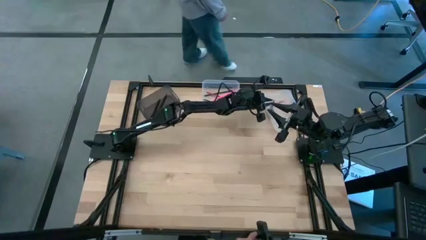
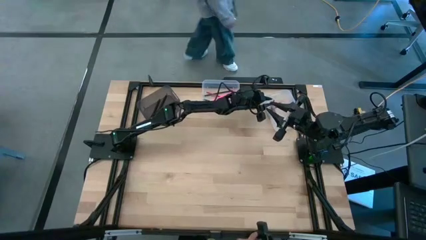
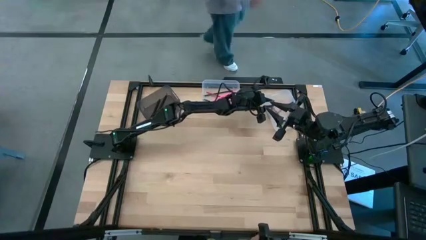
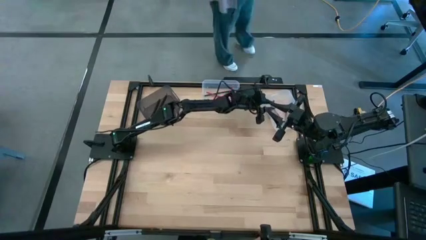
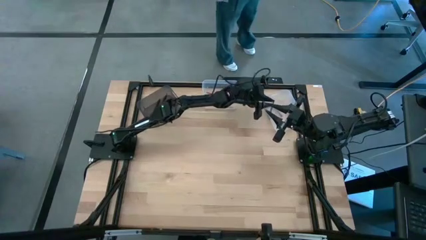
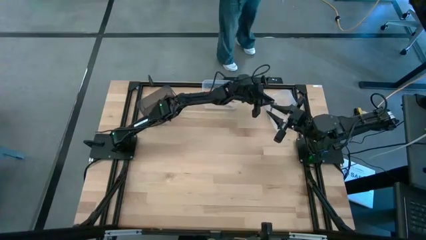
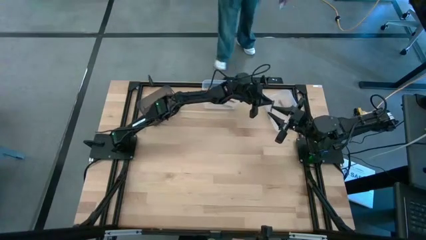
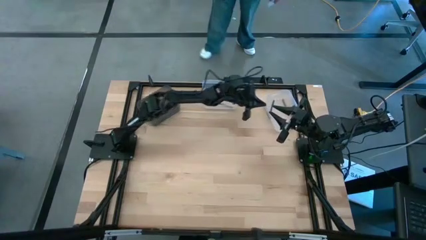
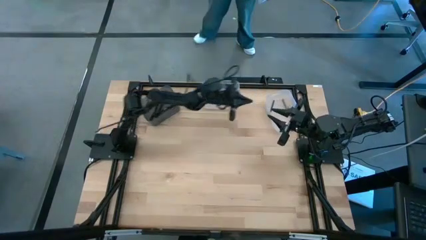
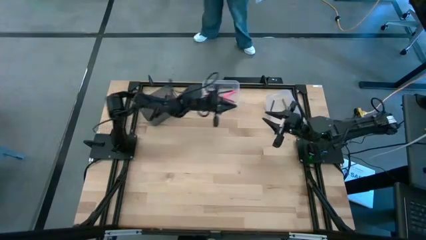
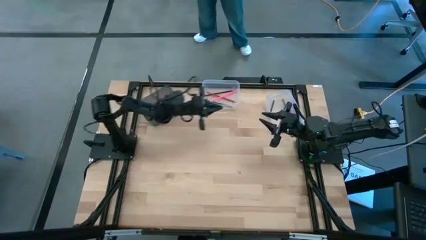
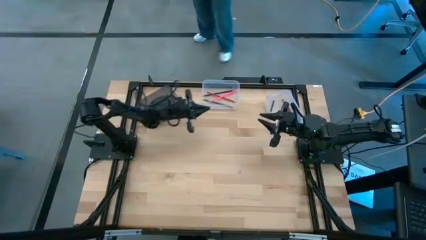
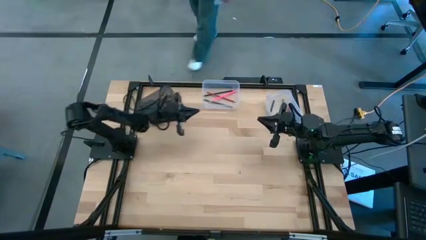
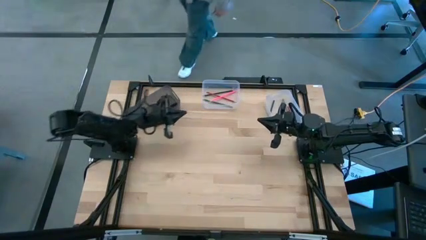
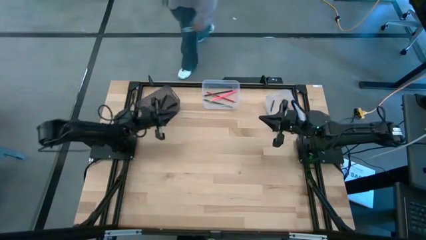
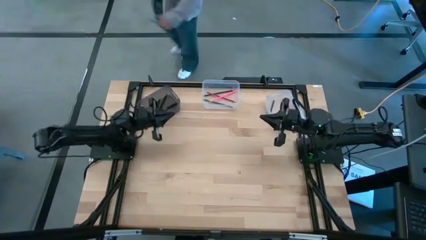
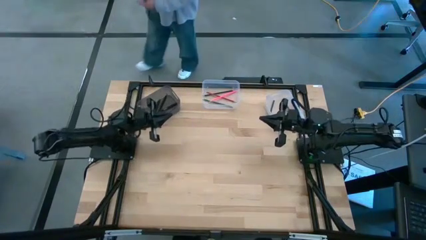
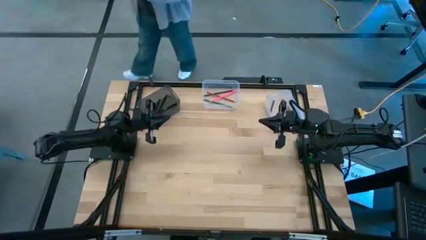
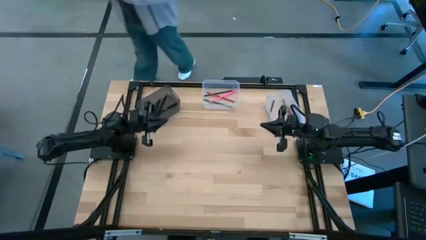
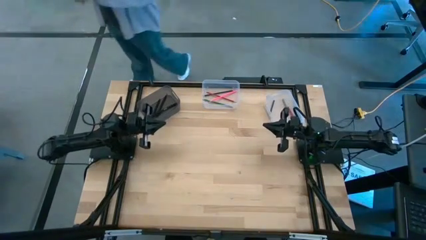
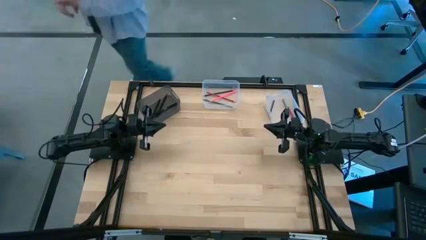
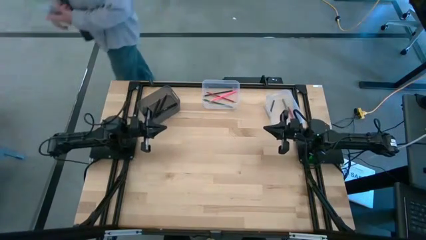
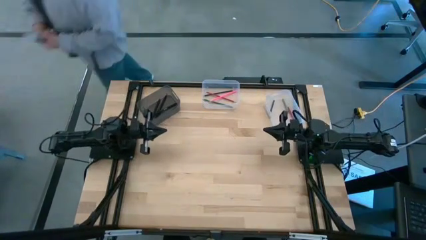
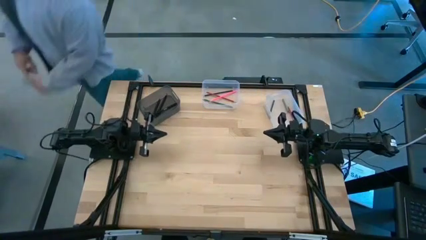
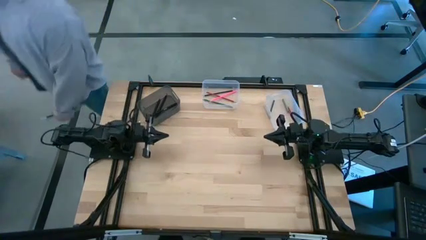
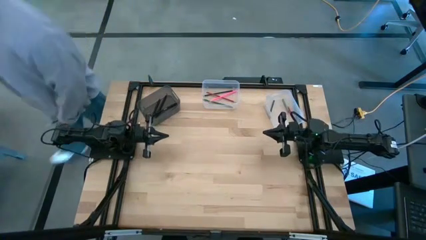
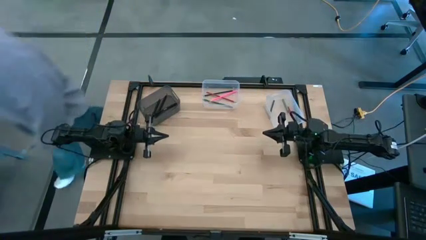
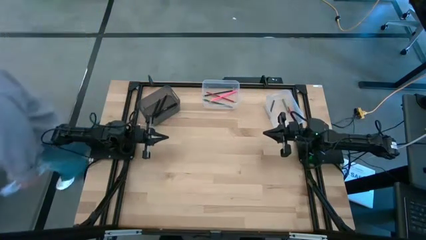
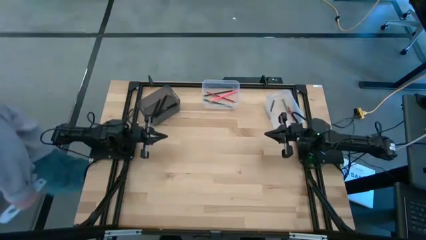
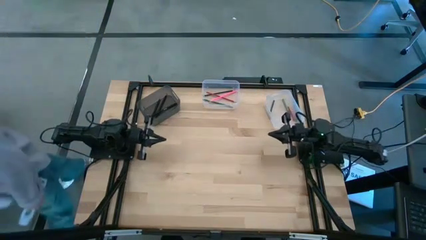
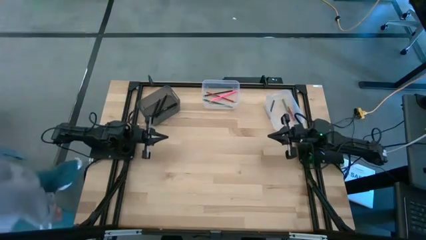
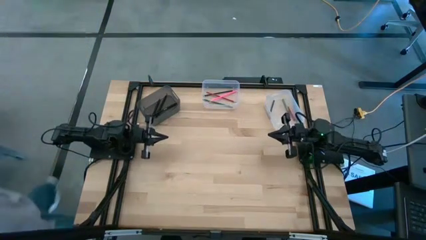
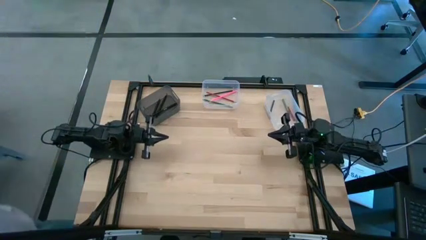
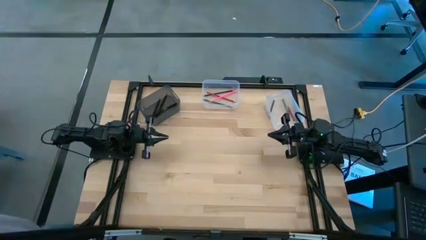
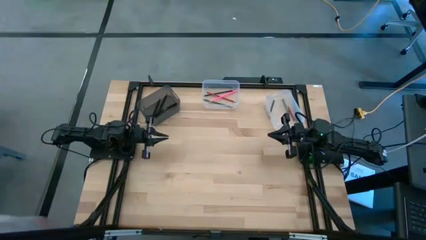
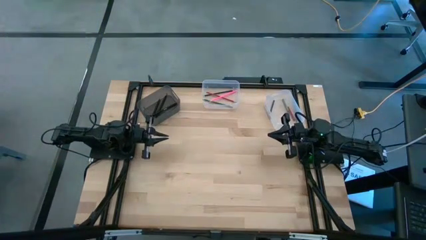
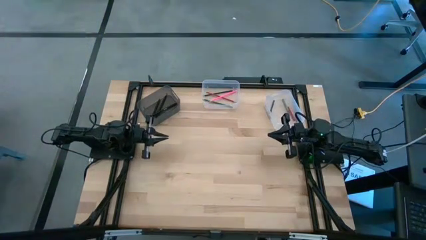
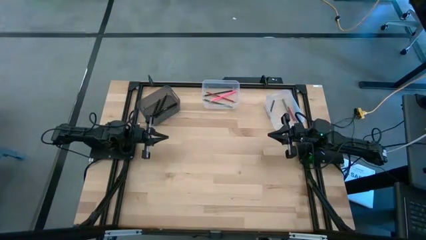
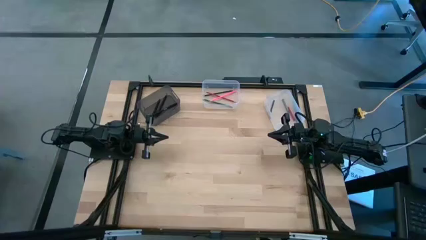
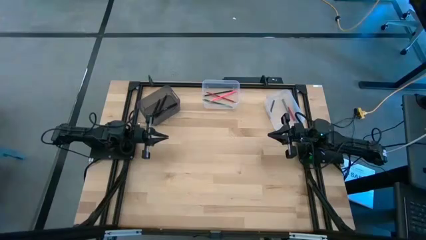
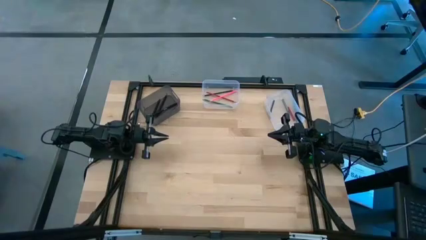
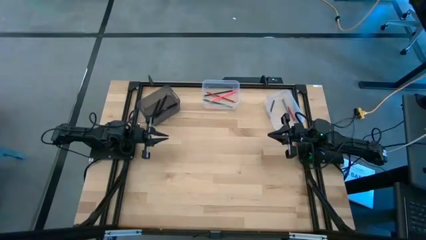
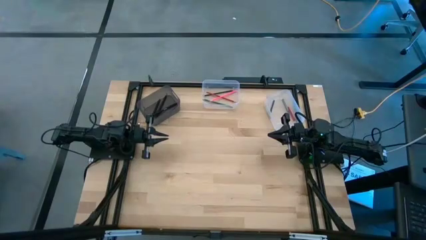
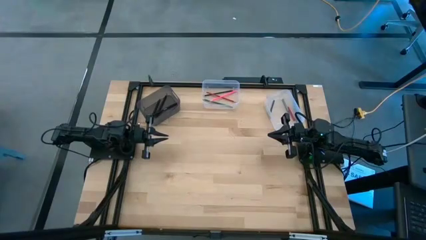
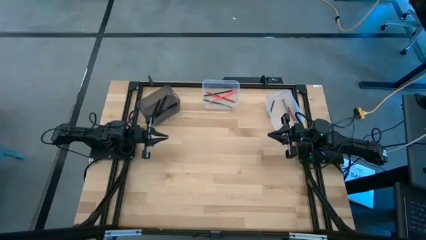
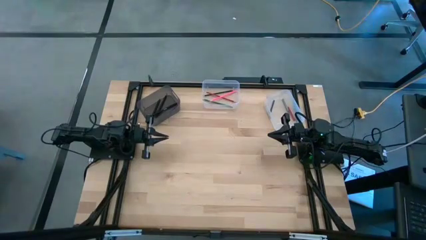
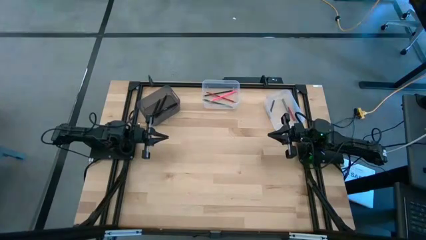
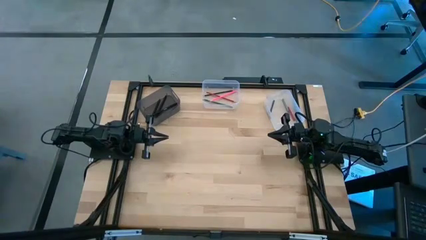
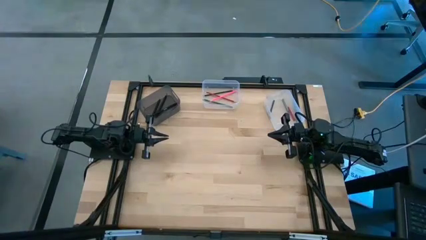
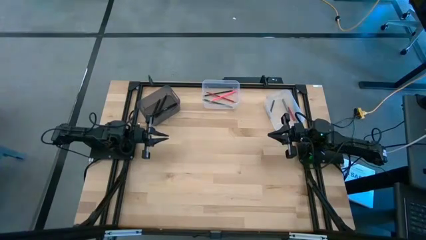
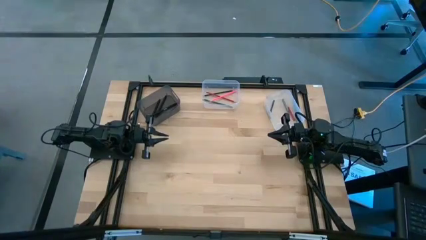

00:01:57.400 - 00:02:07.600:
Task: Sort crayons/erasers/pens/pencils in bins
Return to Home Position

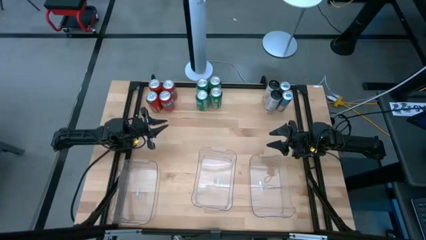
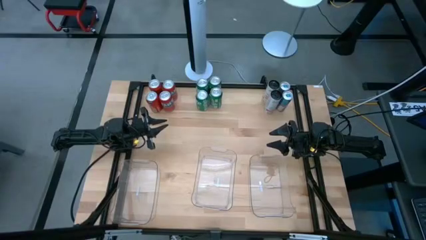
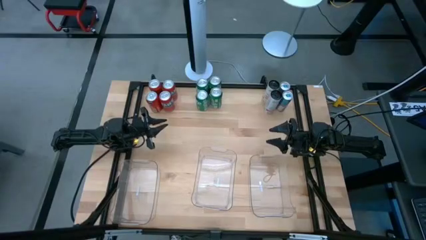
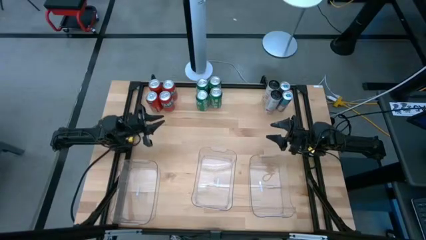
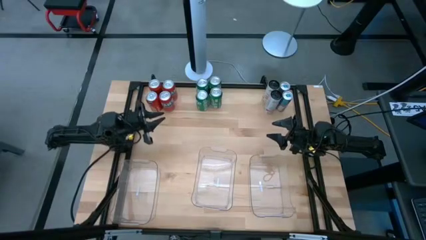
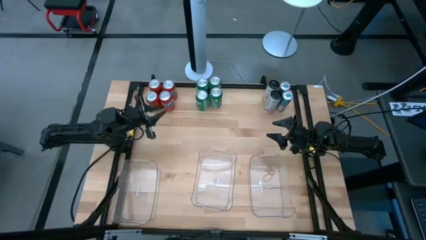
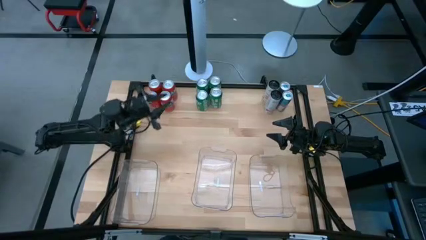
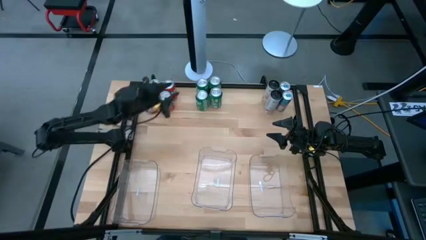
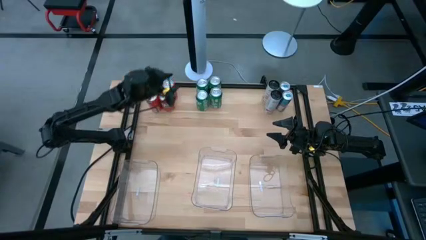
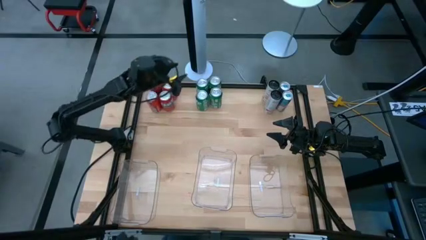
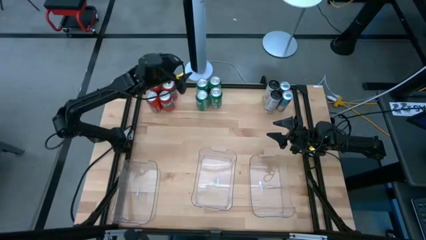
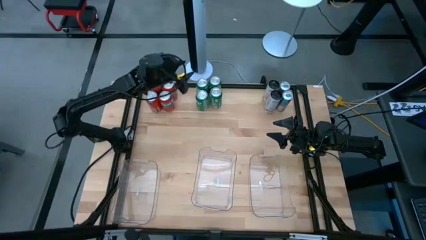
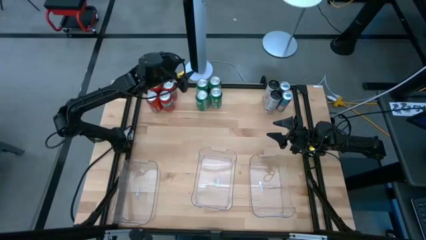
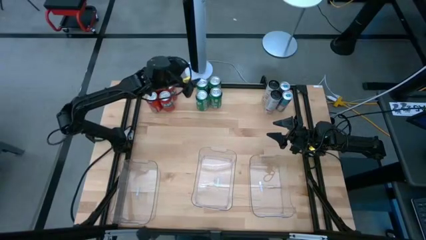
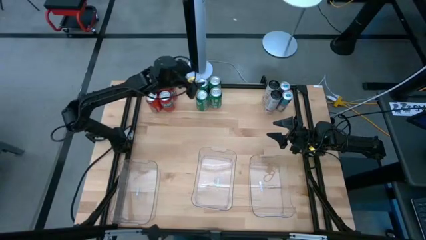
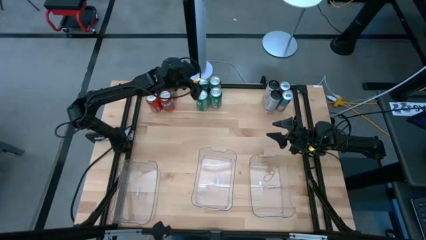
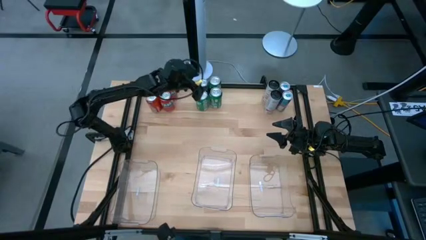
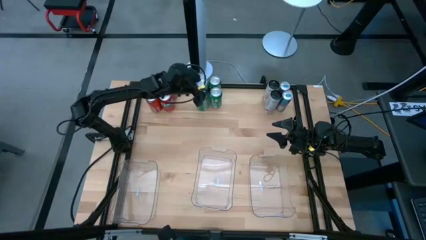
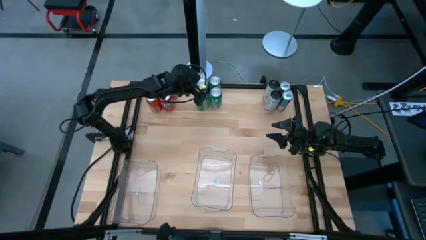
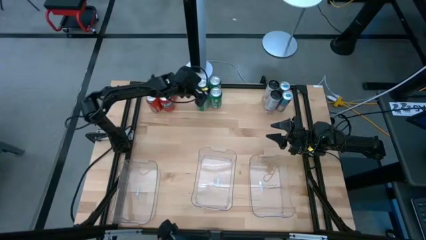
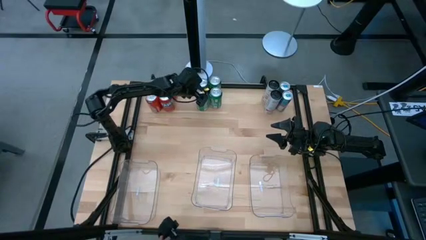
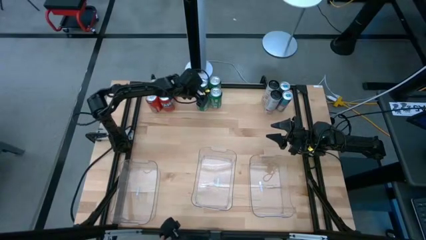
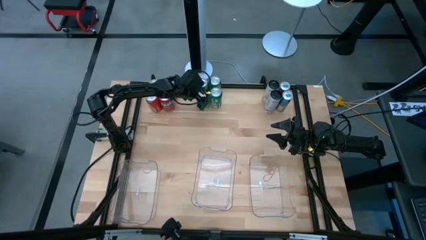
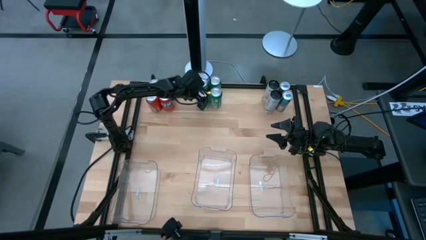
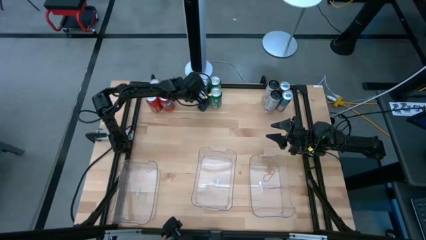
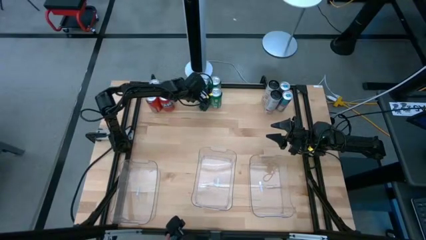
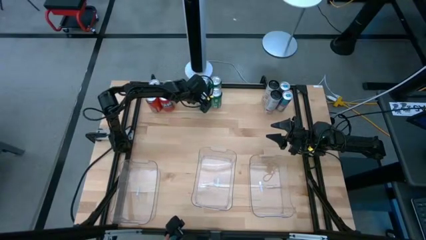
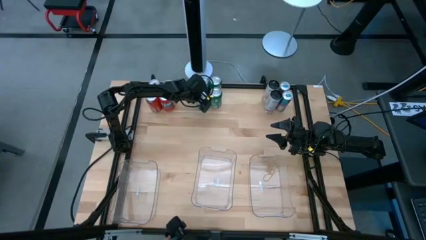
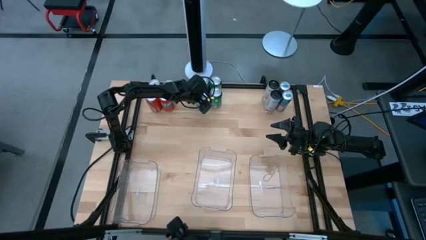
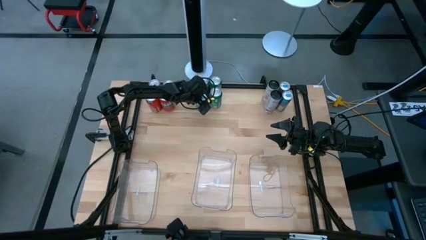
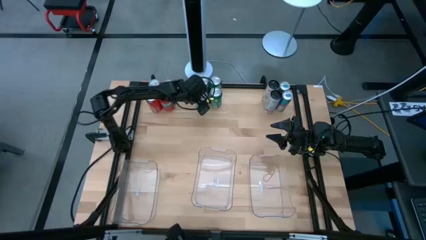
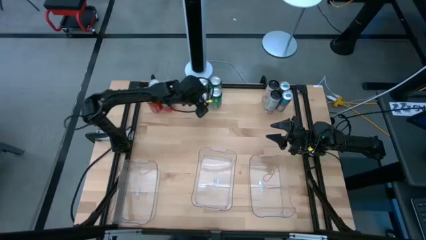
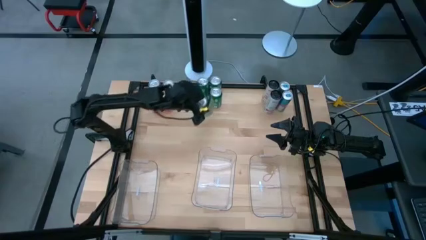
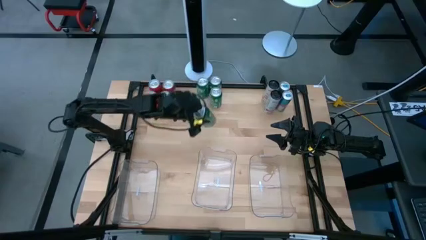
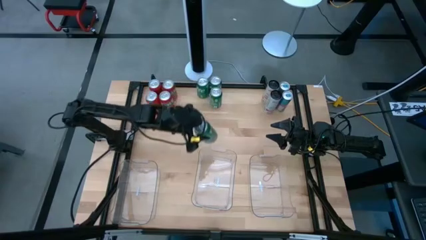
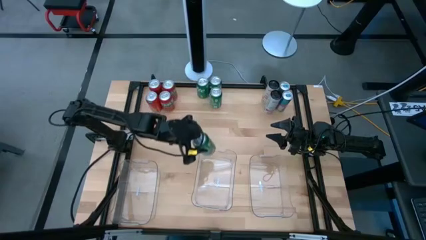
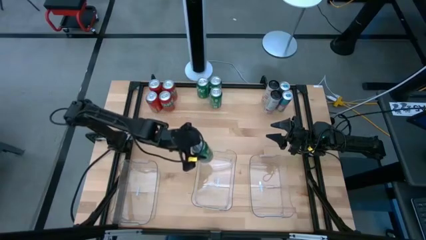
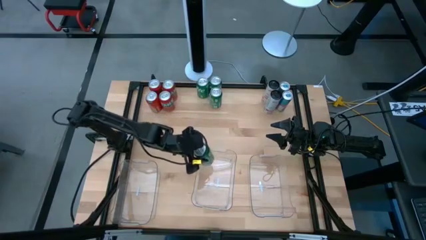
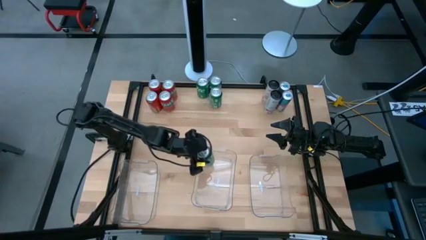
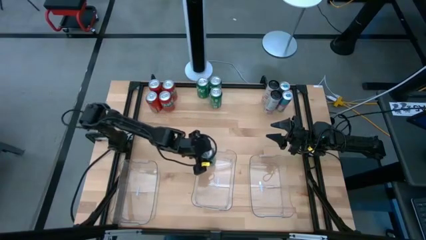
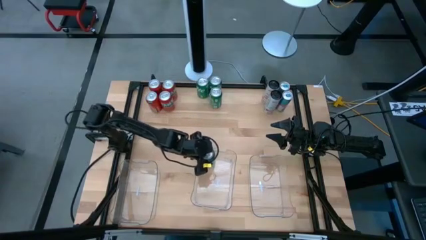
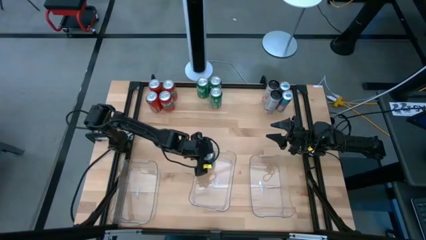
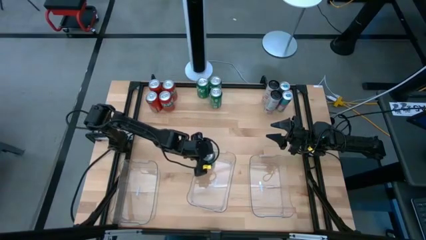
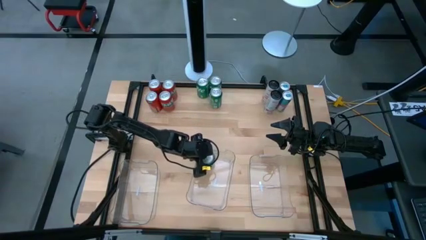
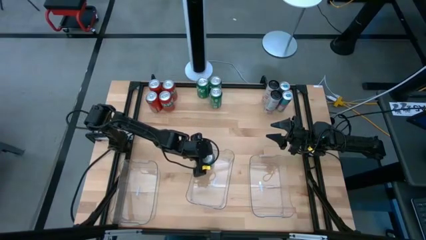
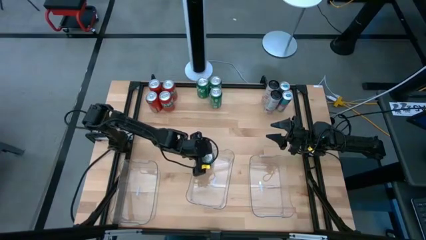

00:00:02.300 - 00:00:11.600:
Task: Sort soda cans
Put the green soda can into the middle transparent bin
